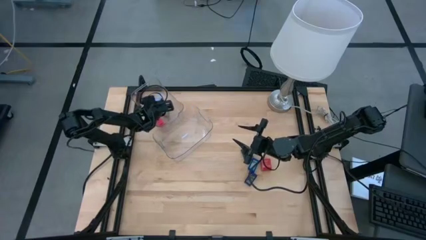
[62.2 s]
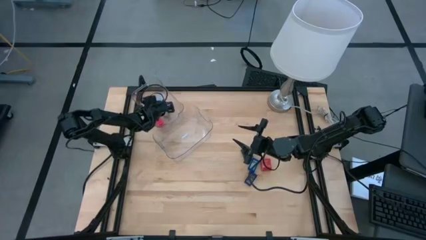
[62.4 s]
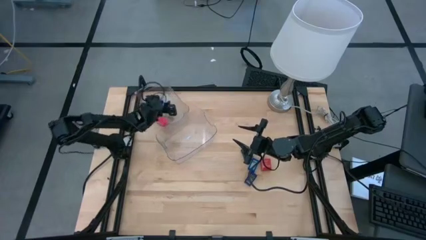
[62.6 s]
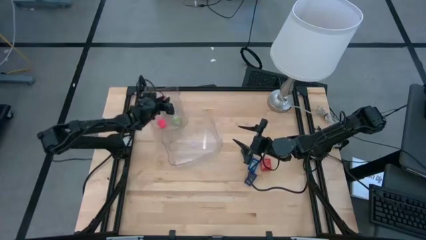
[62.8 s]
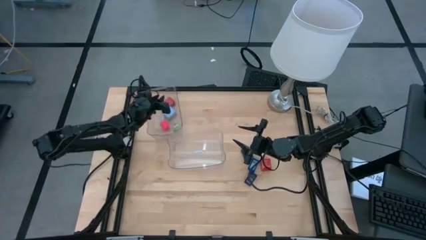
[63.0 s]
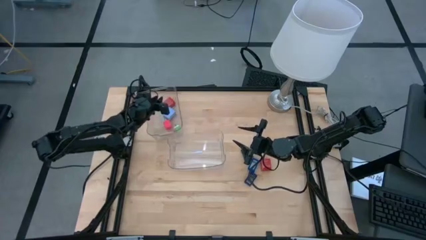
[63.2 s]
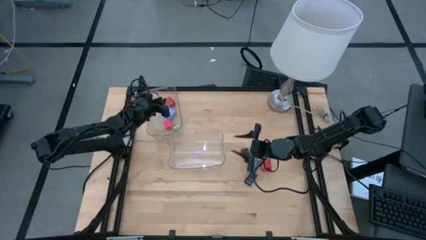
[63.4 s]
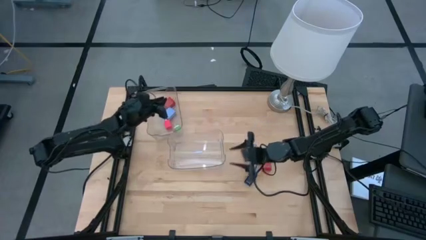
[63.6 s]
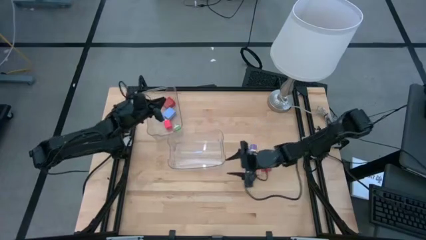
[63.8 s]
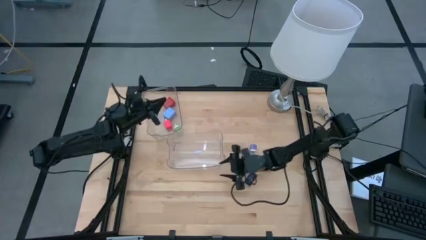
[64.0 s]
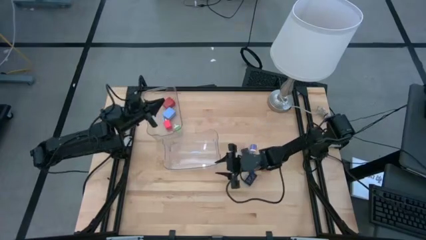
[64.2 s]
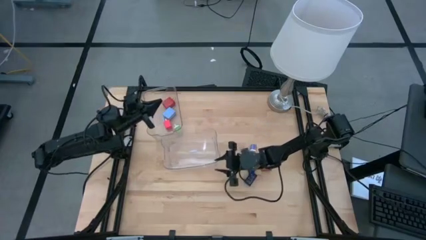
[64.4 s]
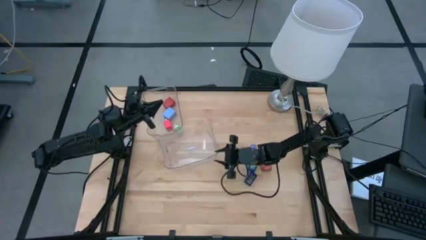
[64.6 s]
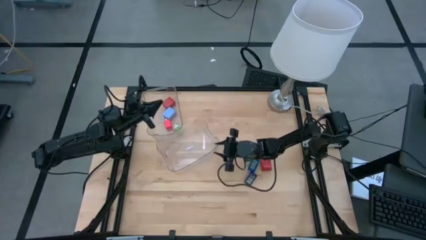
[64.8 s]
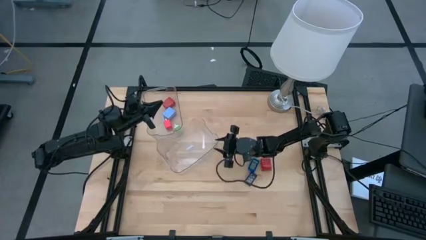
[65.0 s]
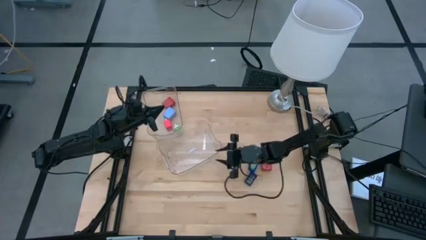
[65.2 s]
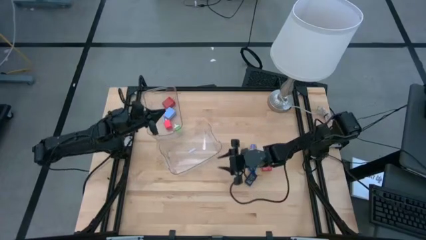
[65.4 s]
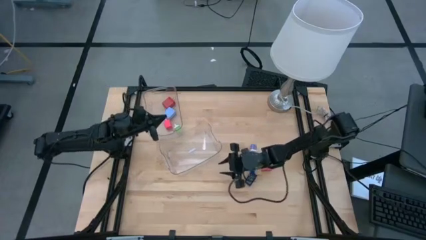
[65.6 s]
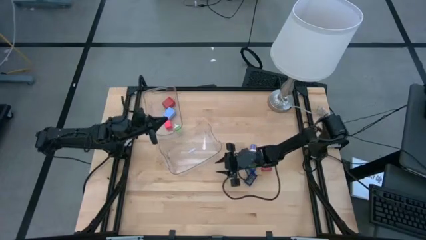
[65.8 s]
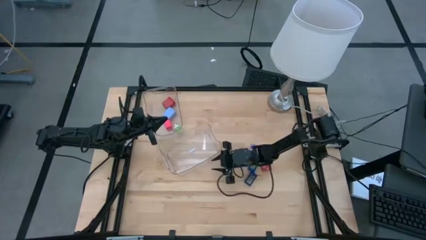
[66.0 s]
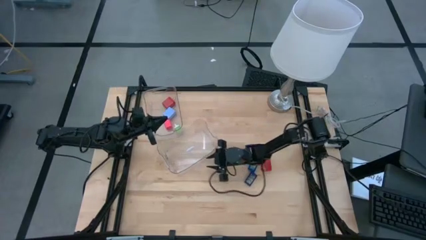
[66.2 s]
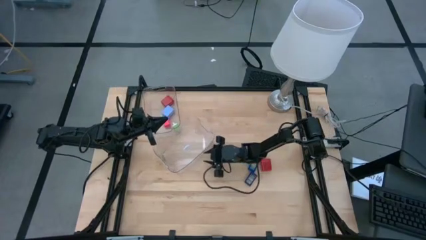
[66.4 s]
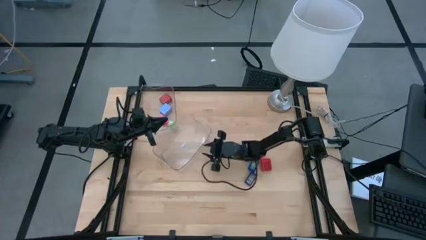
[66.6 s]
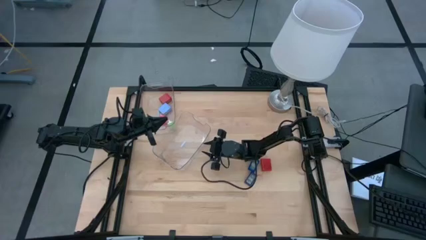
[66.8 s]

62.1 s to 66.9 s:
Task: Pick & Place Office items
Adjust the bottom transparent bin

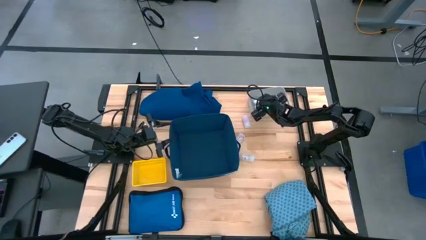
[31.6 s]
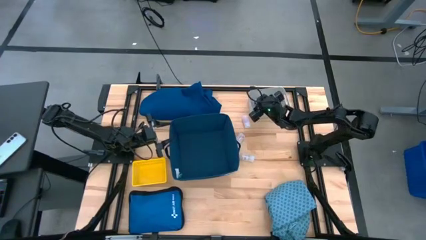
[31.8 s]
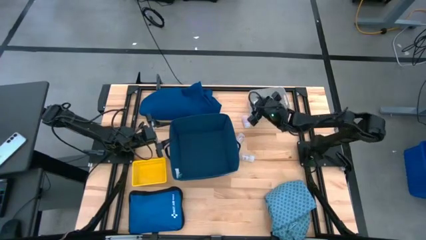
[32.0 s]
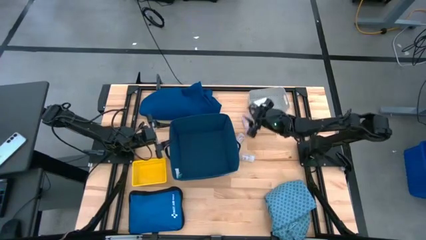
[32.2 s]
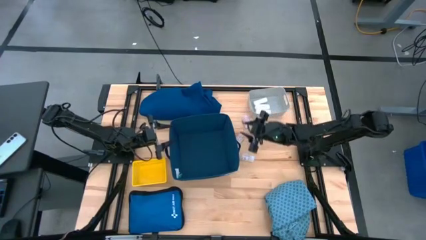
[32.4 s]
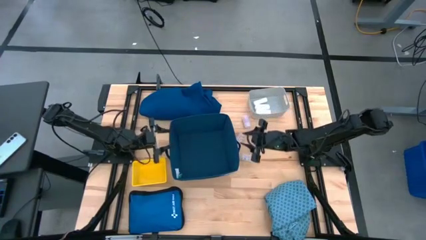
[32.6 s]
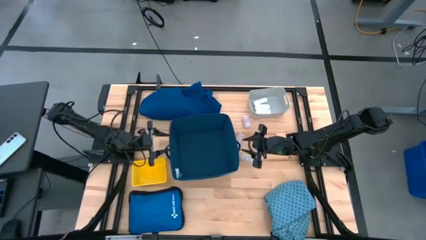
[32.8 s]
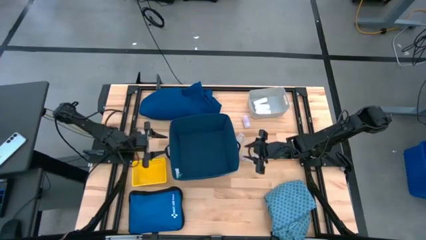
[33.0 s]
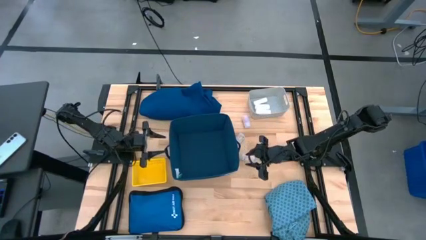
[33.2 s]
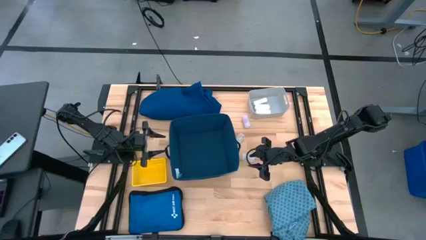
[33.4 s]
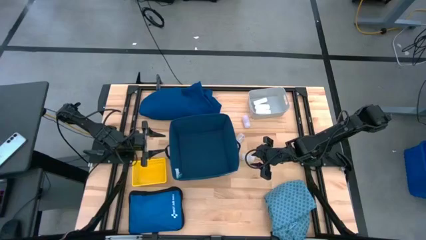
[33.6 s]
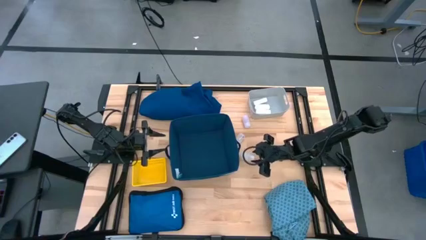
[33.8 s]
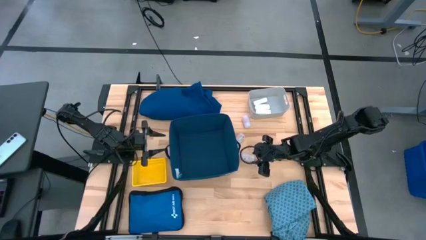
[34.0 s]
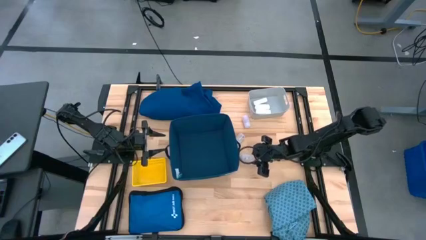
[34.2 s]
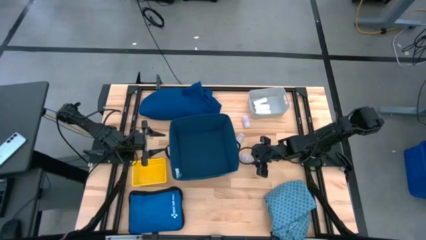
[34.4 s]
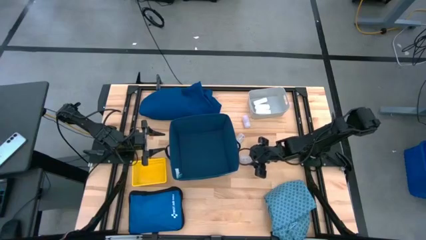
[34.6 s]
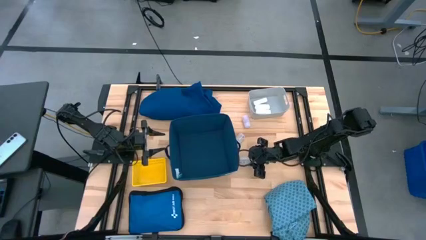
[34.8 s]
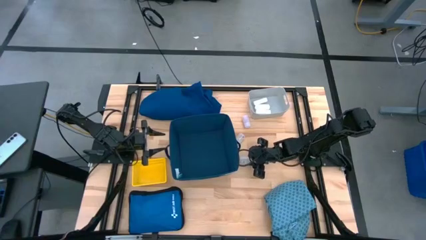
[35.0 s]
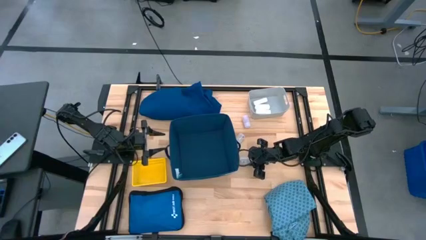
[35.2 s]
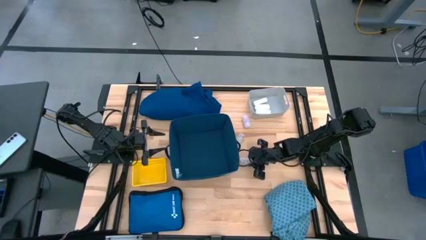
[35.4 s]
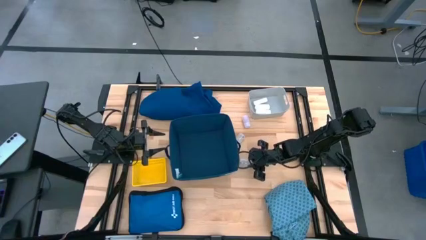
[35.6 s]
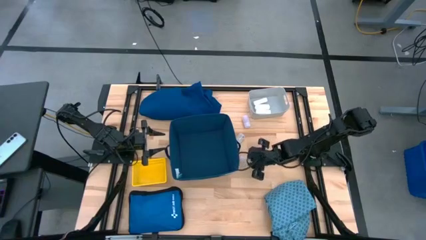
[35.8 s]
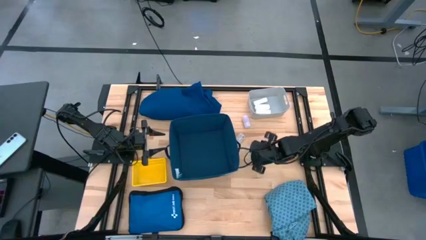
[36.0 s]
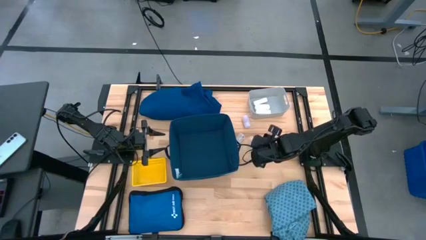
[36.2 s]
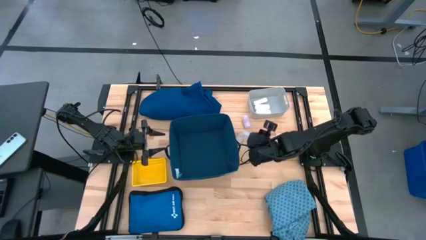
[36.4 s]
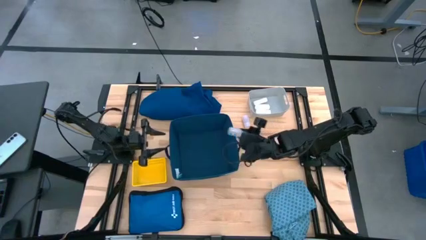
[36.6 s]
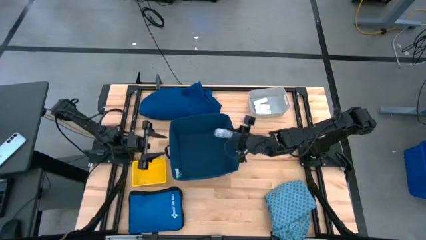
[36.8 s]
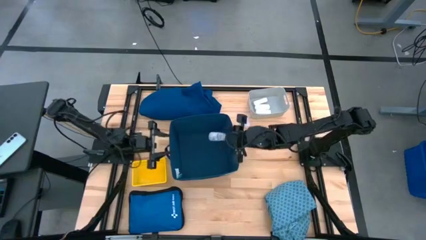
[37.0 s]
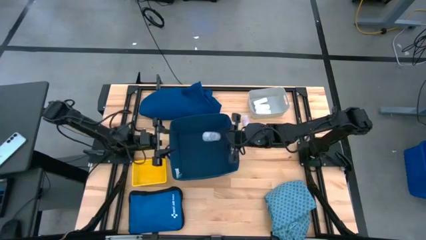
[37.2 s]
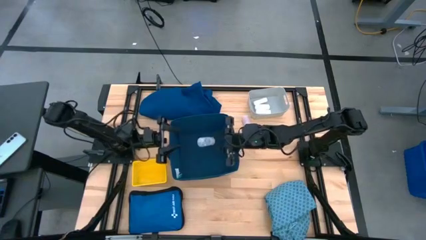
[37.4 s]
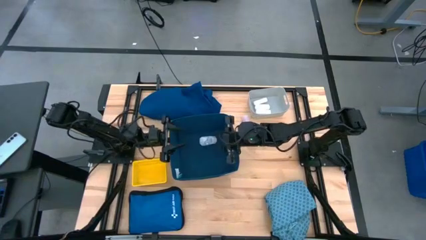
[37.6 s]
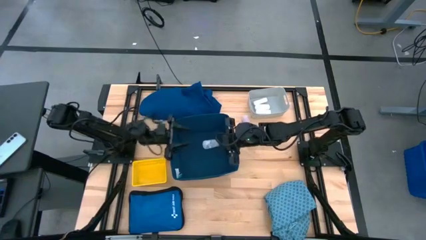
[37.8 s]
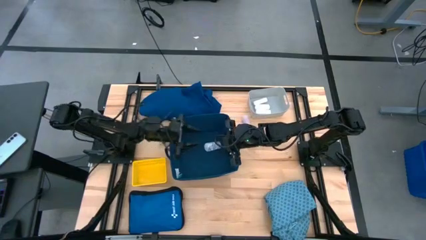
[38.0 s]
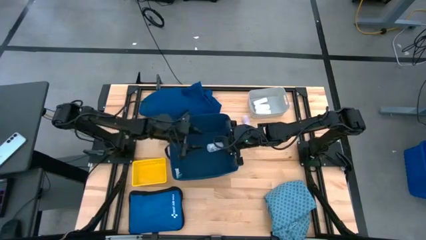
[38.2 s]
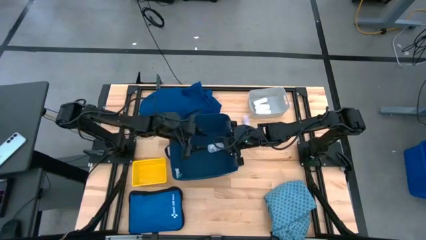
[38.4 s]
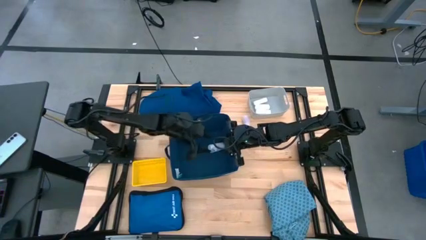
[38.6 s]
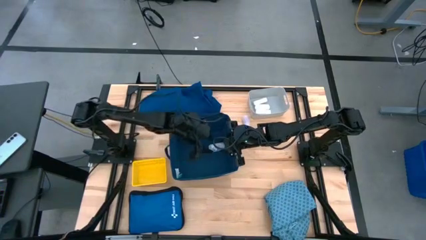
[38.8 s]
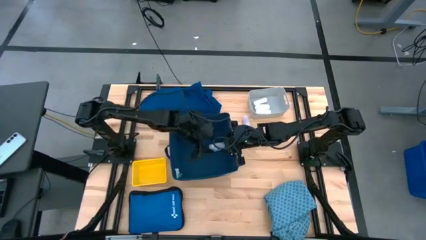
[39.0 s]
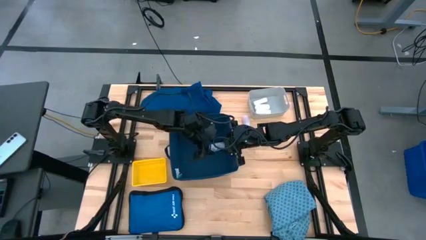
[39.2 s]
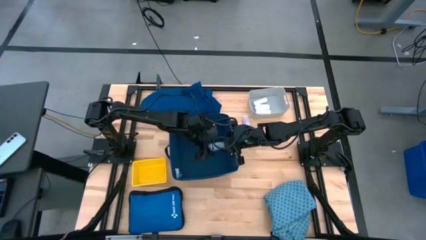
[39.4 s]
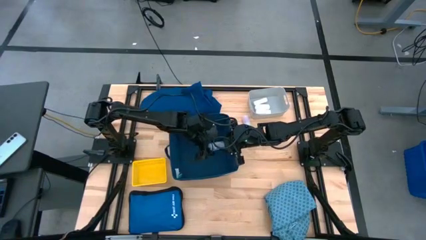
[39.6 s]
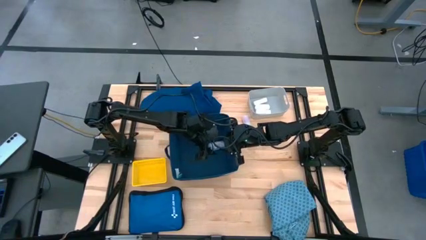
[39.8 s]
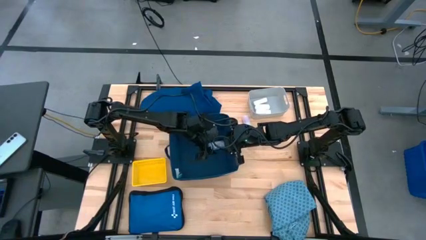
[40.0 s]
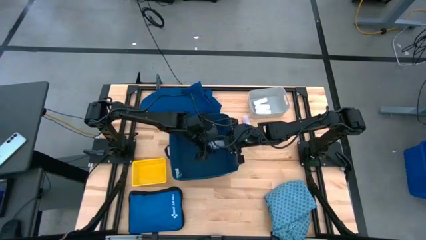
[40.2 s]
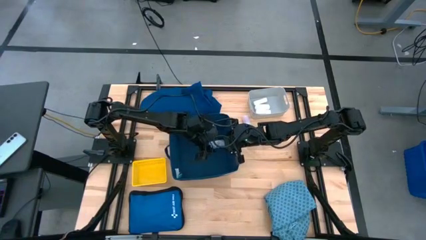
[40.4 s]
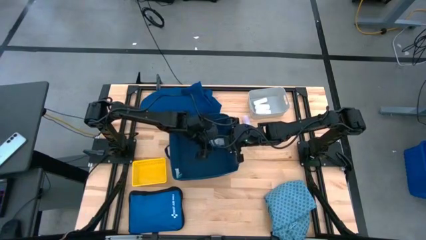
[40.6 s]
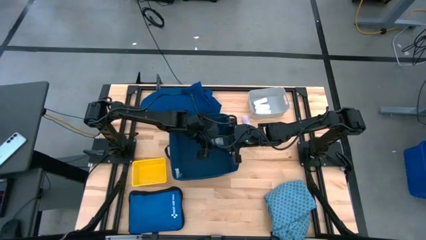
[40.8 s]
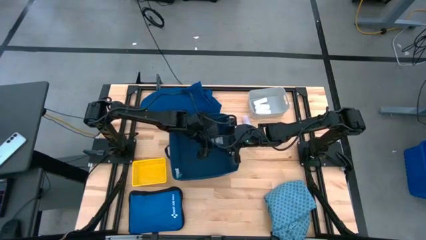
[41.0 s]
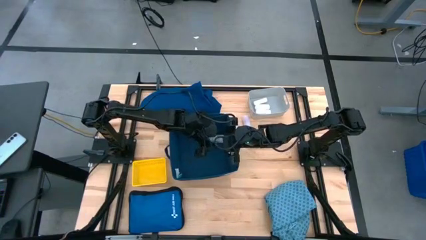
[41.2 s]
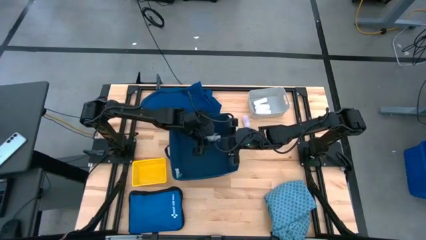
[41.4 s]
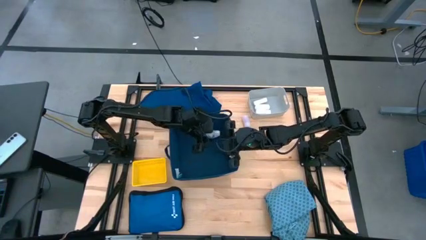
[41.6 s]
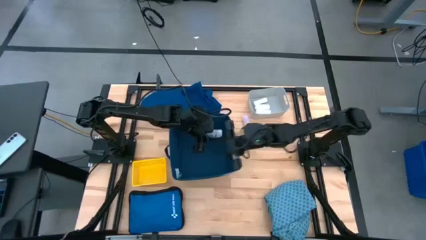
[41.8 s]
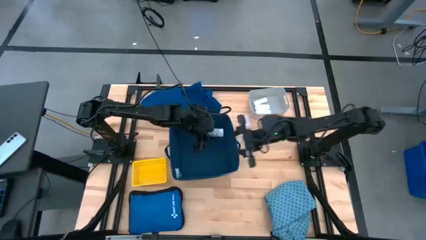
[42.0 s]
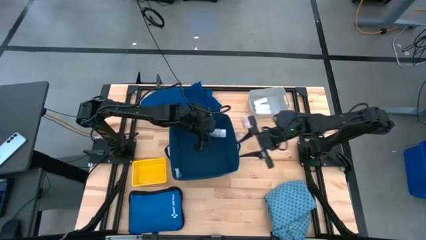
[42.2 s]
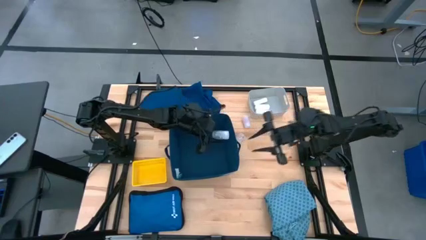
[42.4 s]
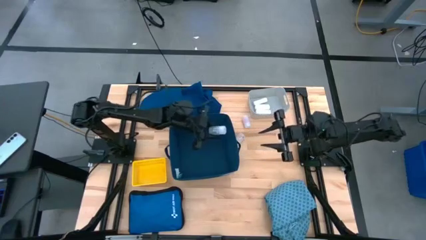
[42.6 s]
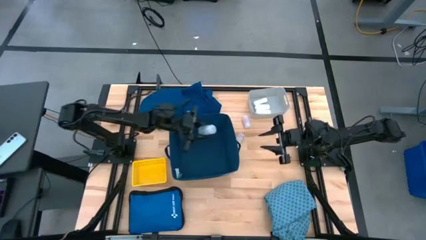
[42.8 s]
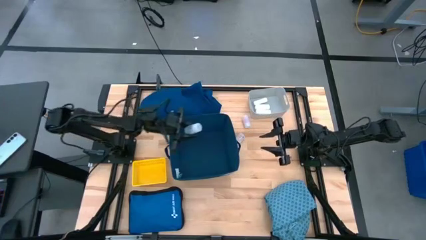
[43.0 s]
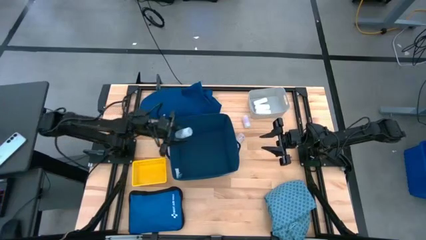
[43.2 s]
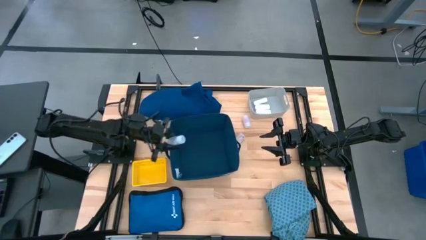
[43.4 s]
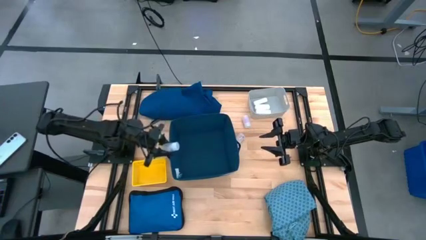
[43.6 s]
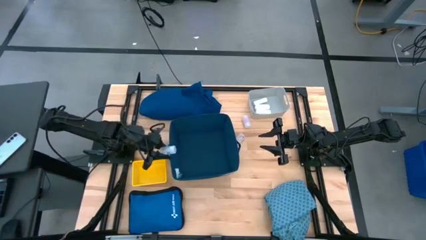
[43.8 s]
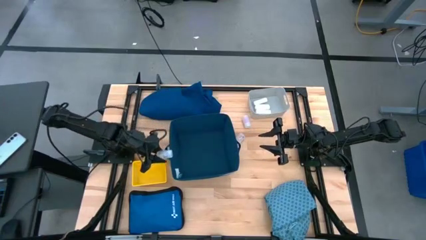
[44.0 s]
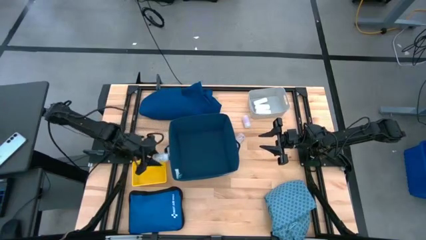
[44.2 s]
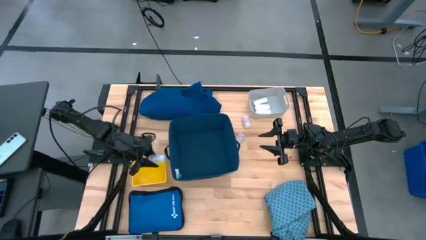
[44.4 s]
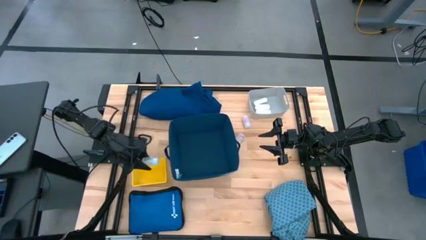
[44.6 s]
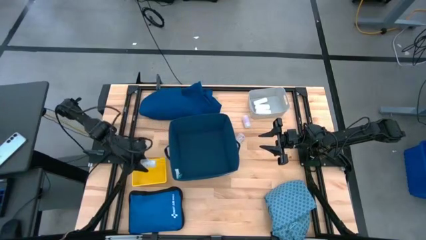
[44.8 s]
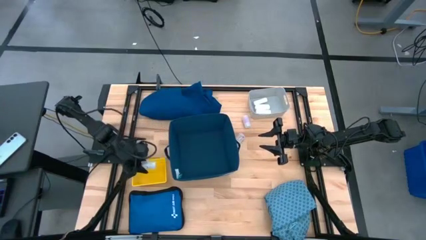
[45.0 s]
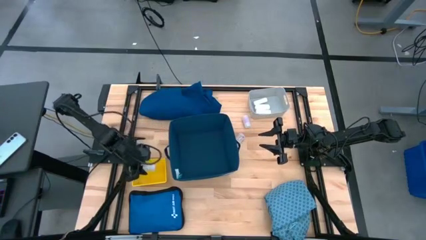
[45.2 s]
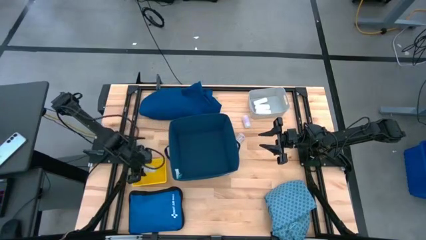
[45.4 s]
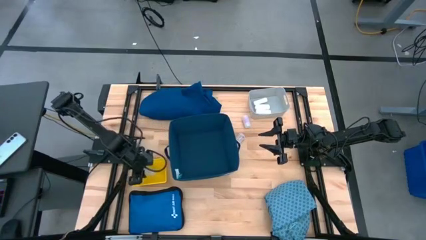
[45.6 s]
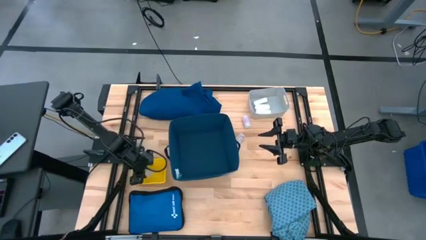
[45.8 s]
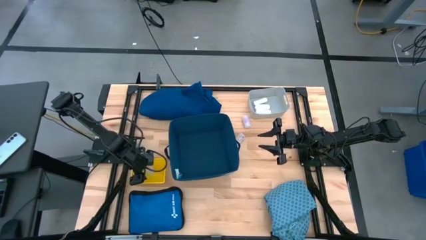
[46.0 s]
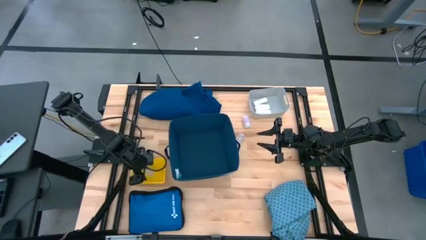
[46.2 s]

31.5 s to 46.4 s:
Task: Pick & place medical supplies in basket/bin
Put the bottom white medicine bottle into the yellow bin
